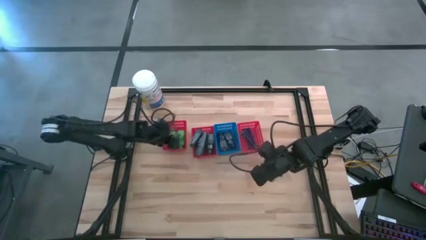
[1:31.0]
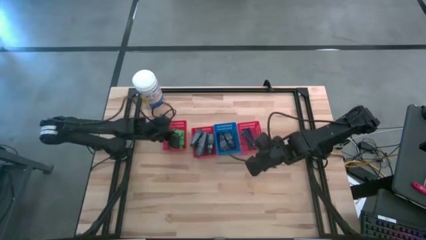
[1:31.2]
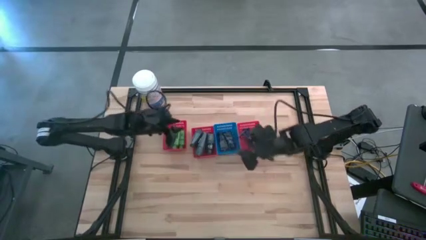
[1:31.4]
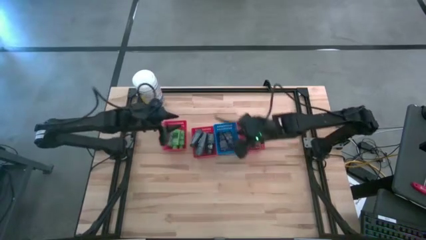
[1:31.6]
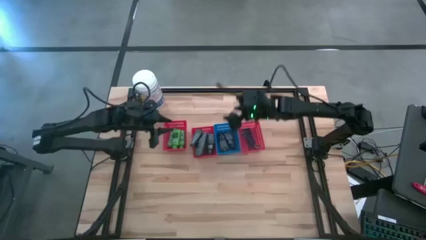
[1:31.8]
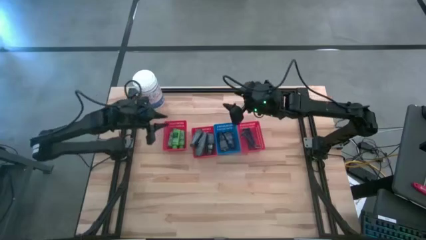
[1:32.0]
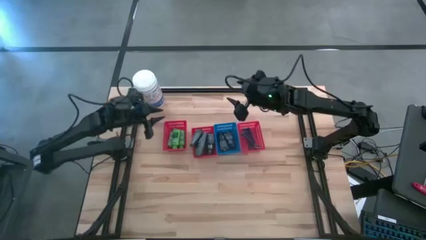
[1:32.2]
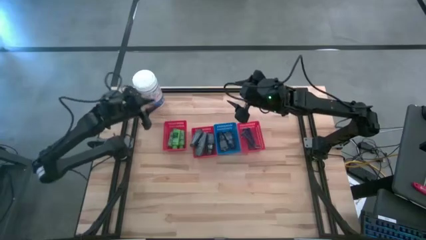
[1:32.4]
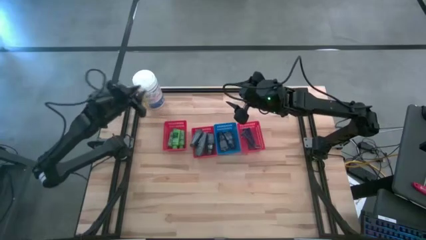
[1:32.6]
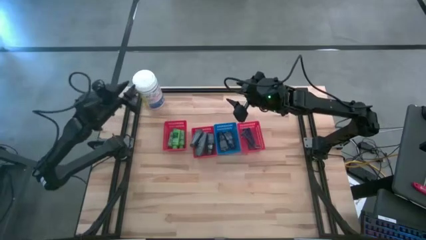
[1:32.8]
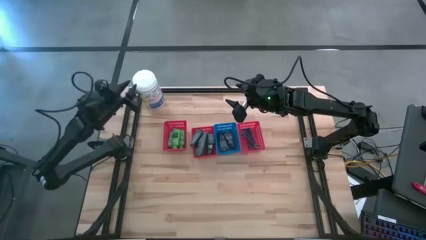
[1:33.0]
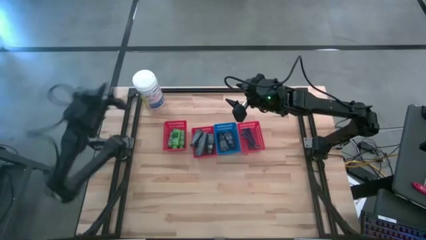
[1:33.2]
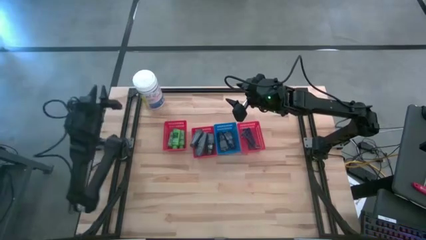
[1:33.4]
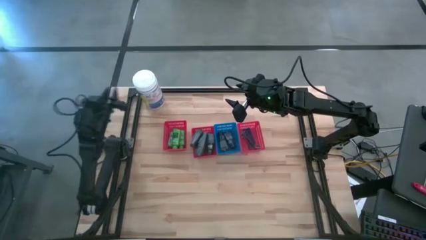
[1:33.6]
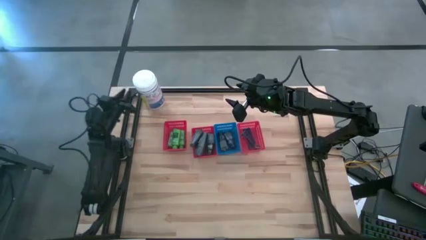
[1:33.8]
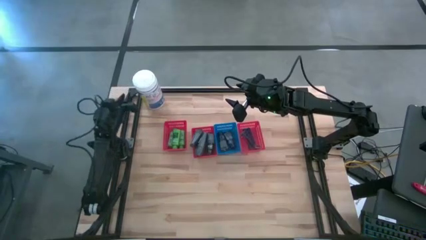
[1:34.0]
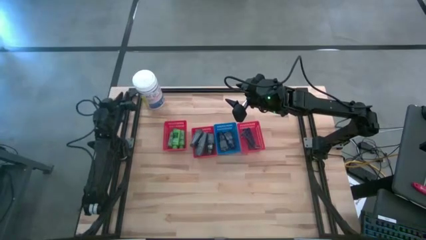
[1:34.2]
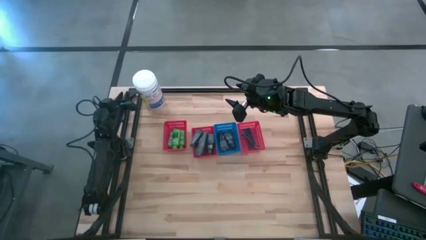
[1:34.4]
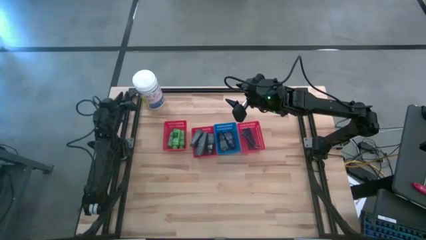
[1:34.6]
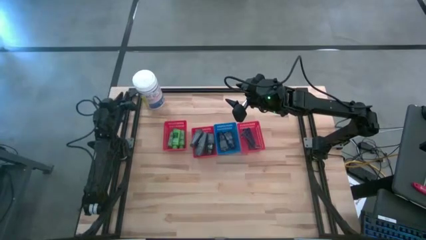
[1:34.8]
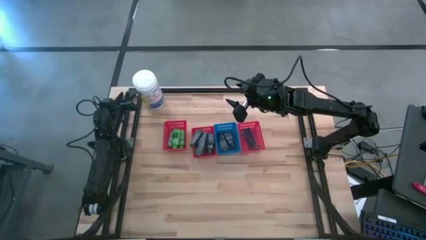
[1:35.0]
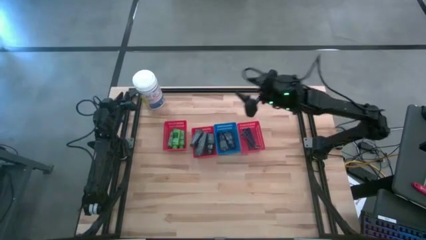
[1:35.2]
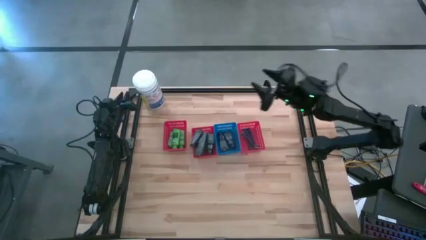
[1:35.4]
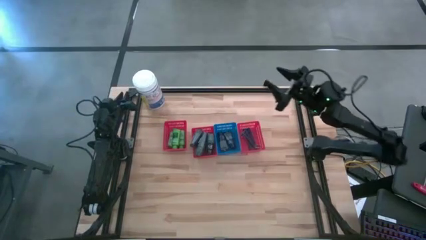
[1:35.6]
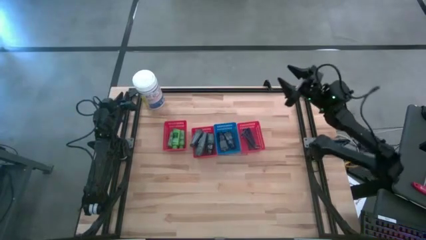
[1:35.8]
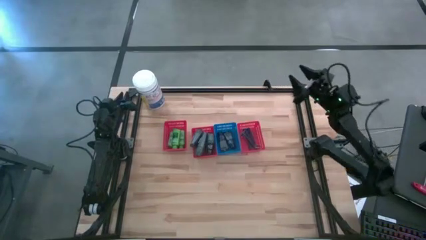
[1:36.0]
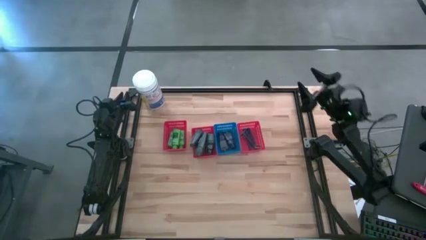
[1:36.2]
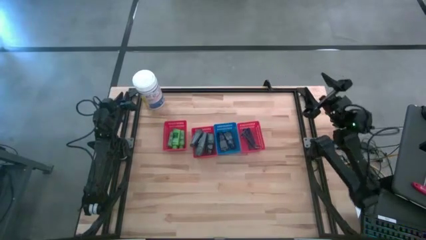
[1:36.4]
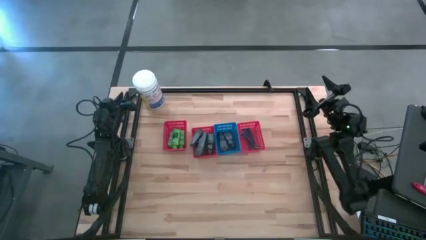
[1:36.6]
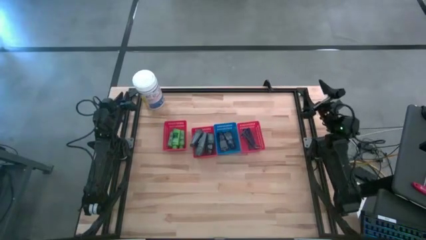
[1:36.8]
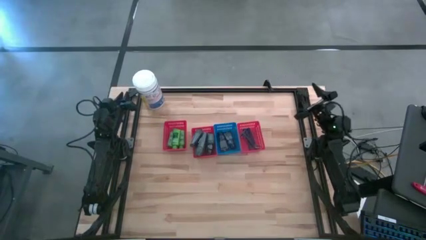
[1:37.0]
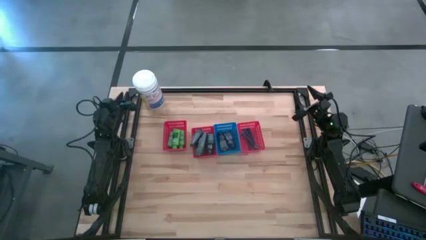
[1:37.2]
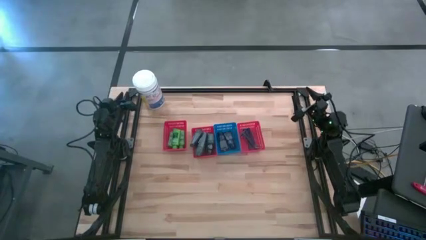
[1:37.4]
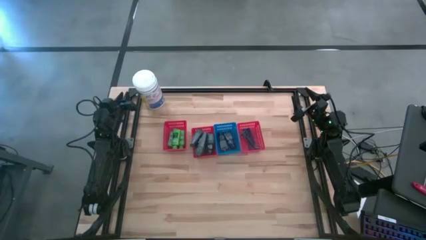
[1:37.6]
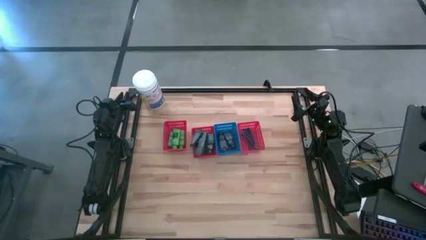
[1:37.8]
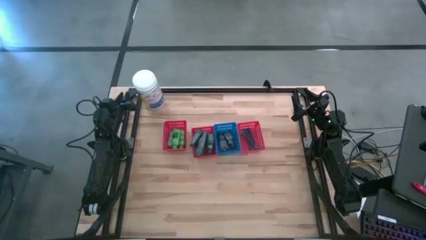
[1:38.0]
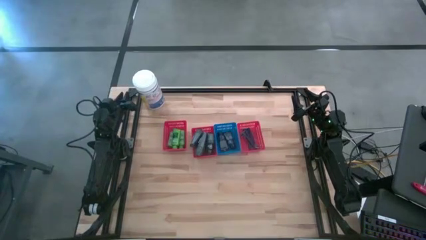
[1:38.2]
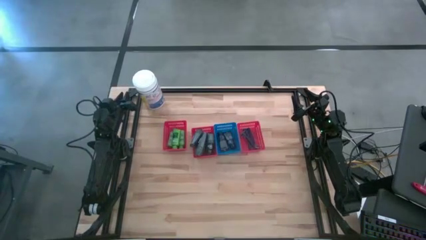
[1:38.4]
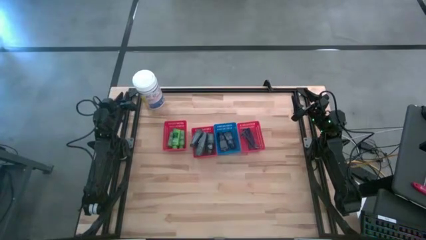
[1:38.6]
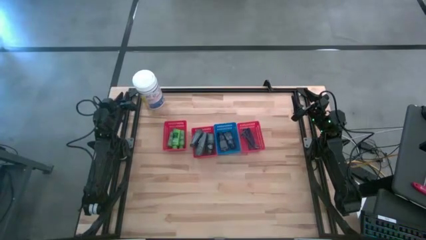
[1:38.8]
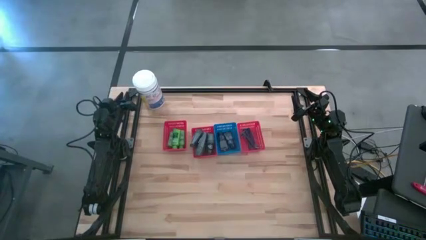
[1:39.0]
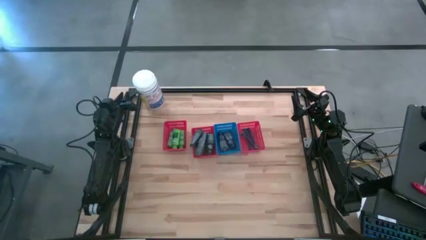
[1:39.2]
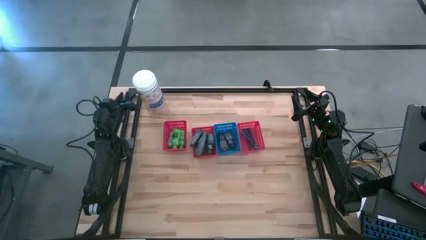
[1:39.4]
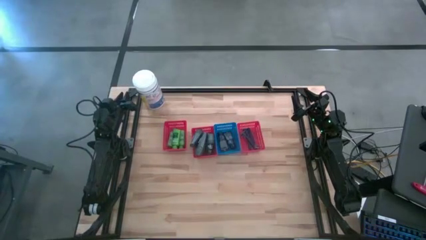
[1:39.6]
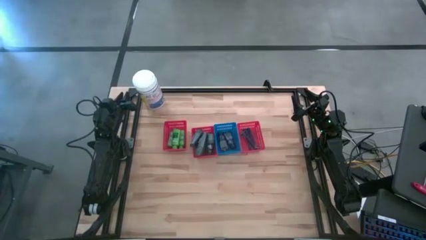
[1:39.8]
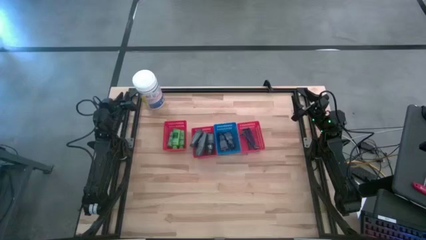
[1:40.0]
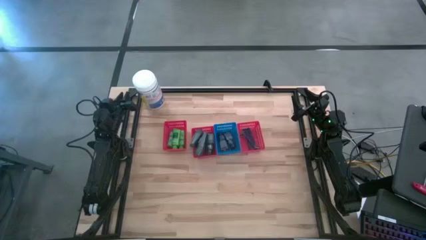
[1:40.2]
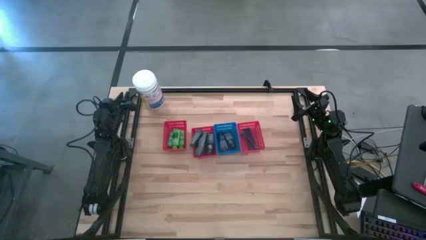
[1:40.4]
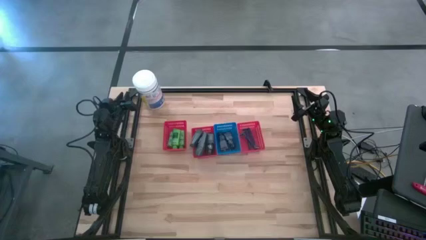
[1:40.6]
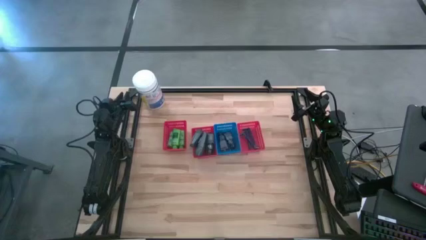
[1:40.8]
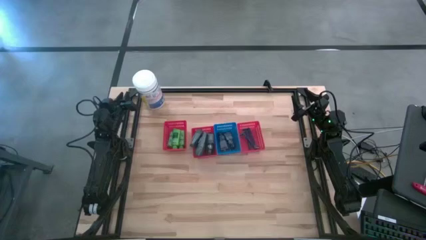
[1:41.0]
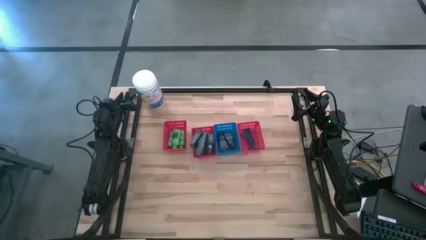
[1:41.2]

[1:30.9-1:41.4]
Task: Pick & Place Travel size toiletries
Return to Home Position

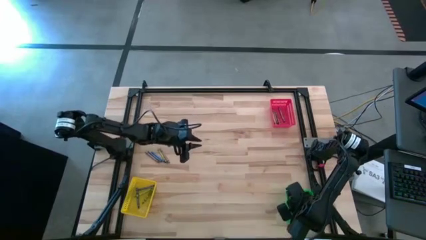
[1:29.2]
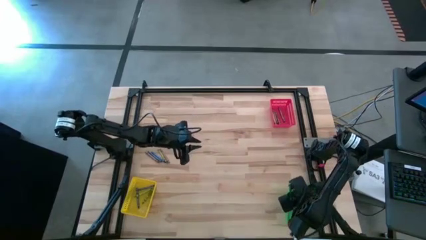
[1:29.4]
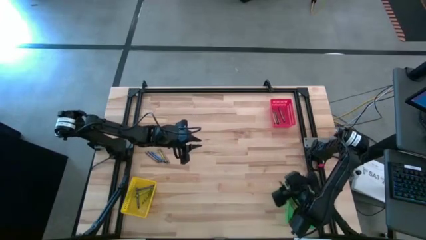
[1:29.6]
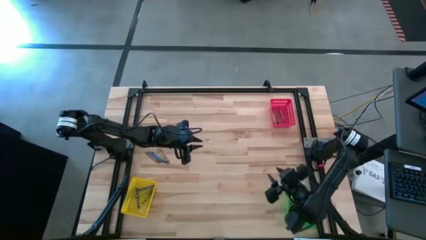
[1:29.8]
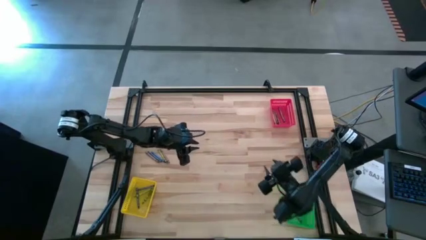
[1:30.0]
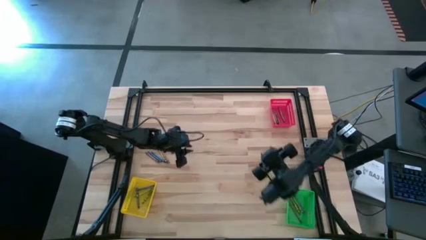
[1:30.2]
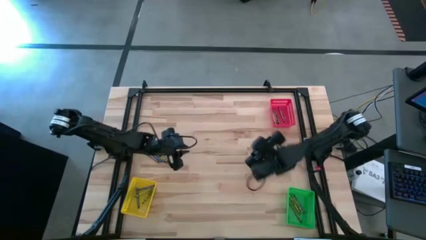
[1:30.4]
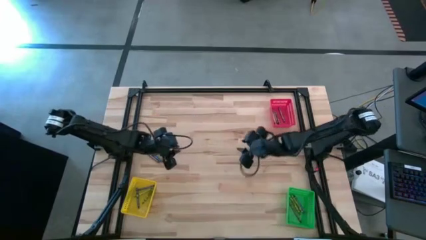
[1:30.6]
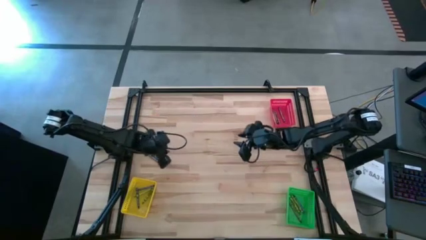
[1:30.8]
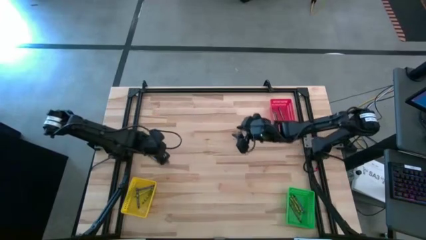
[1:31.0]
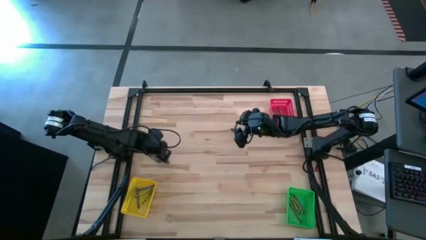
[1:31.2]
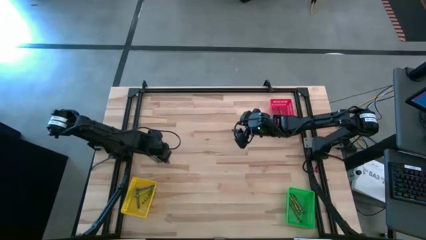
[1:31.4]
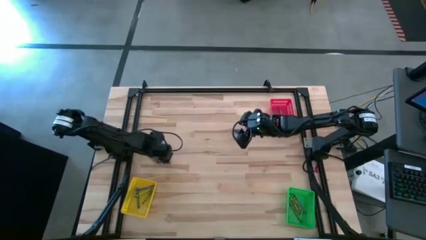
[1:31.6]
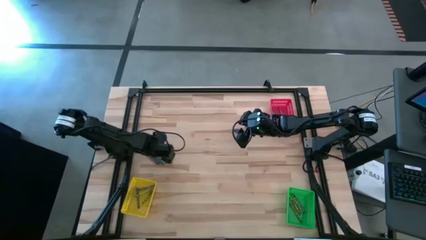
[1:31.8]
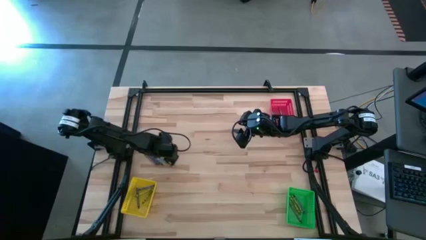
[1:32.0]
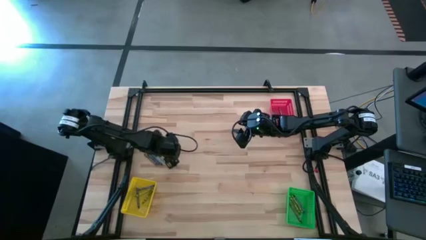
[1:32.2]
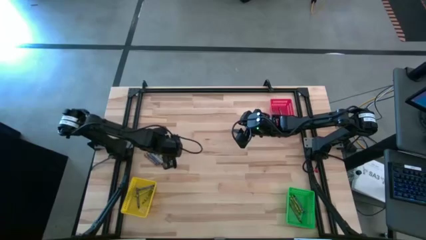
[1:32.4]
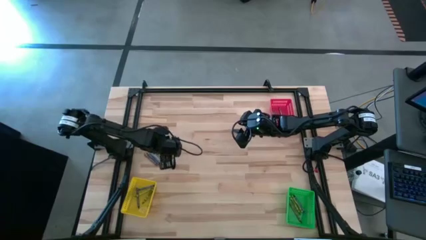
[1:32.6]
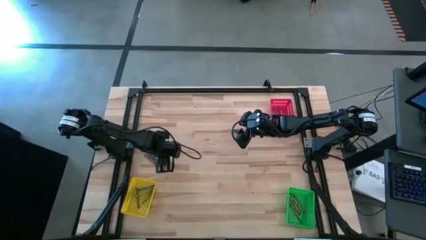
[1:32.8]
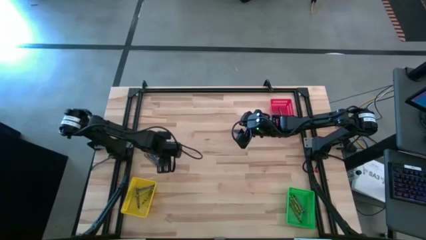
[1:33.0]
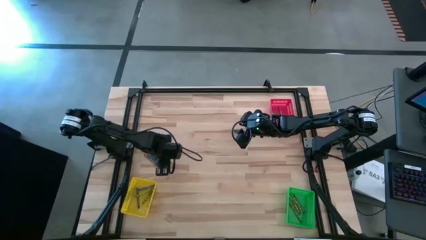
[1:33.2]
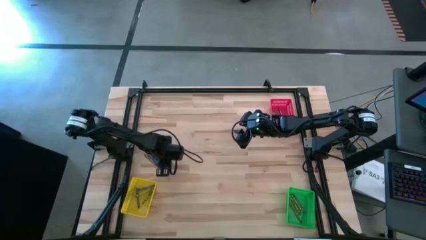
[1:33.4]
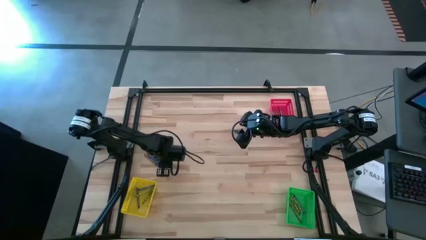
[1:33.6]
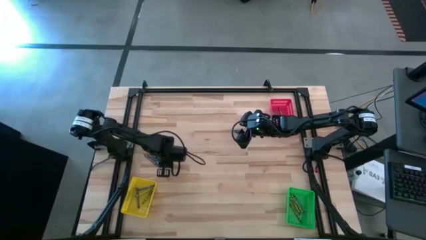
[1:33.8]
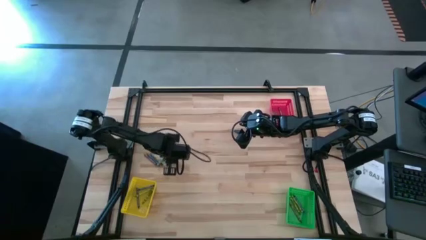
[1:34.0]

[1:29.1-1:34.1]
Task: Sort crayons
Put the brown crayon into the red bin

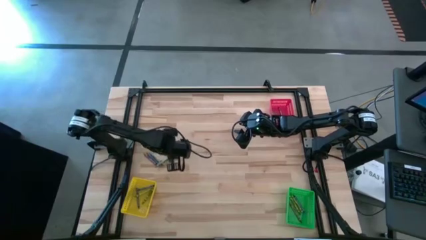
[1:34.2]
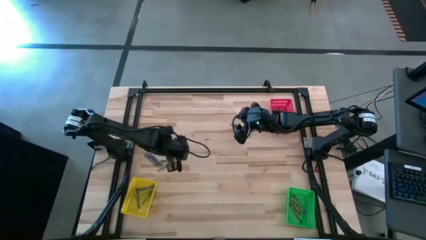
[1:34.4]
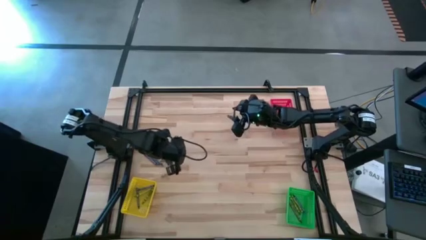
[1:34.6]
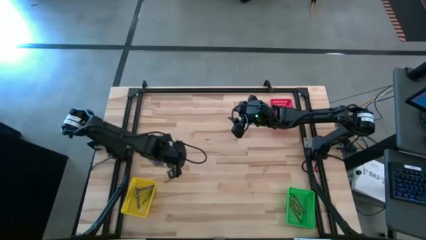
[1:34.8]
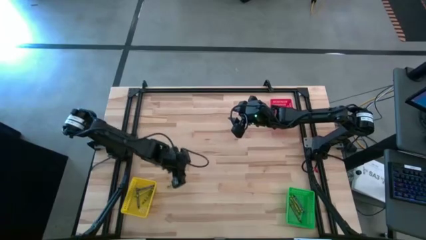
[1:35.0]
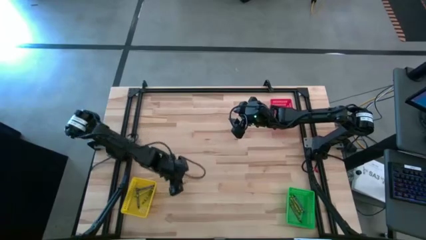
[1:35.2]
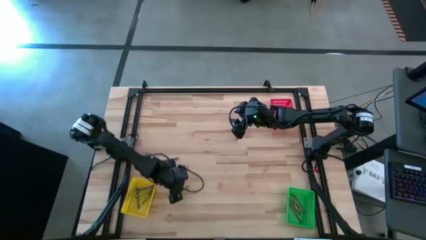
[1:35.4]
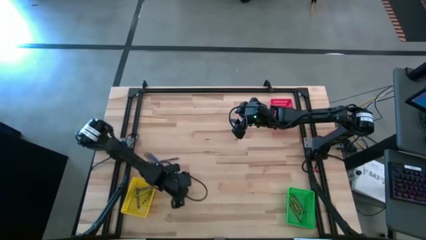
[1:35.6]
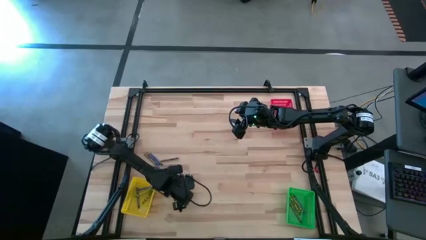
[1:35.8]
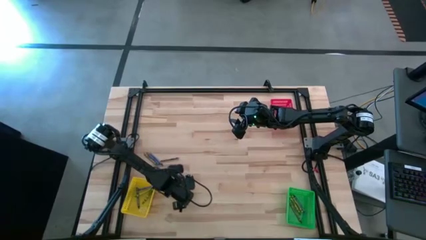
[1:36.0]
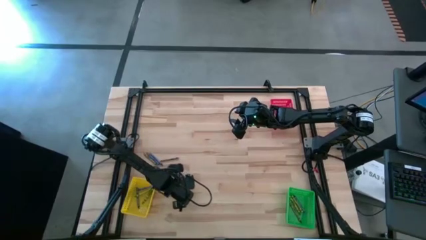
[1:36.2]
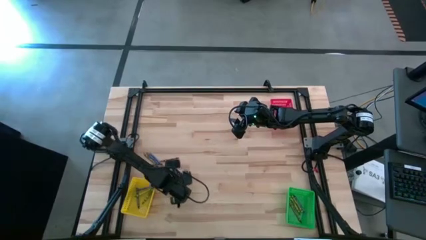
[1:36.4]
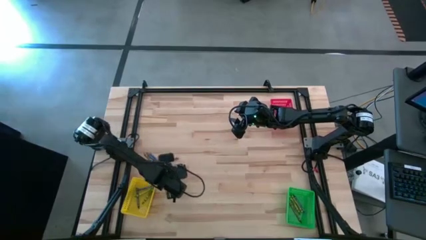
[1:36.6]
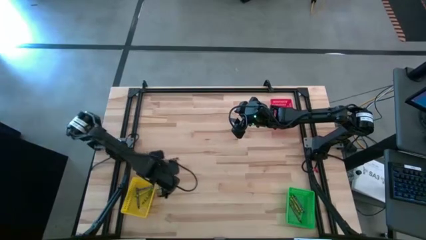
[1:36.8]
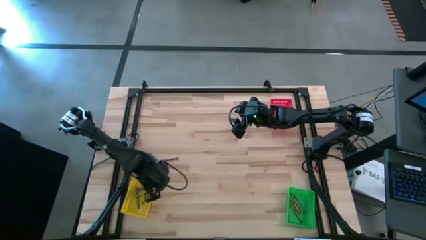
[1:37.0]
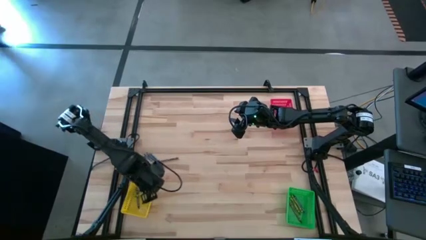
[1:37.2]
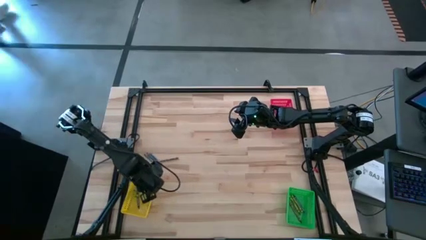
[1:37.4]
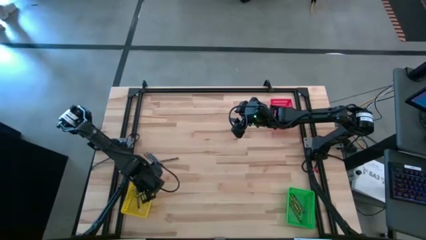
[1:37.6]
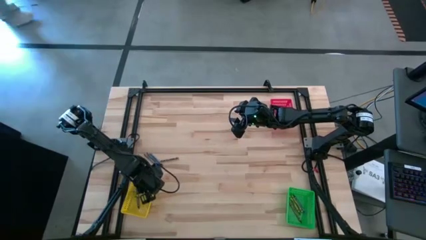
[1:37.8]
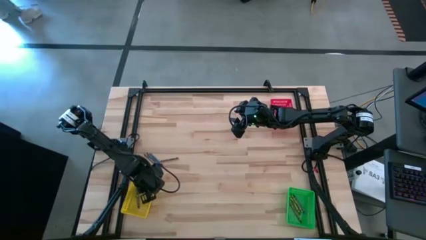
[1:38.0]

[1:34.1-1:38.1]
Put the green crayon into the yellow bin
